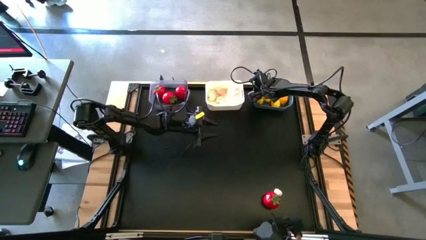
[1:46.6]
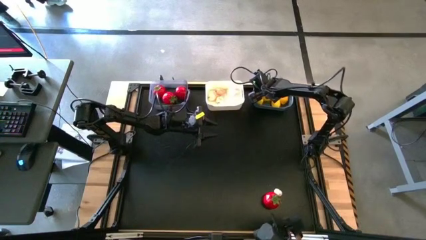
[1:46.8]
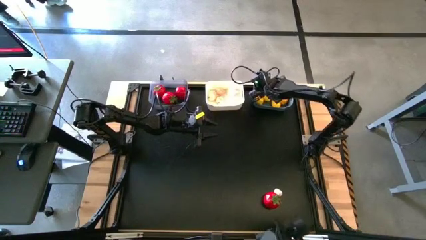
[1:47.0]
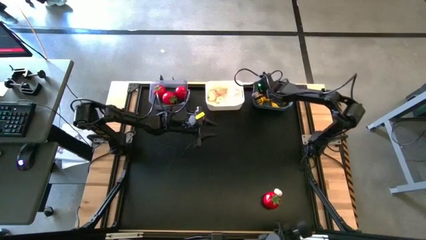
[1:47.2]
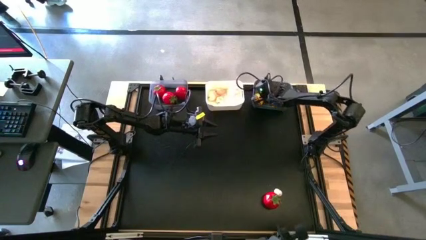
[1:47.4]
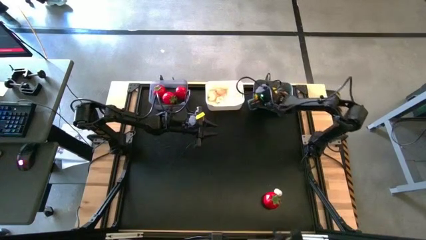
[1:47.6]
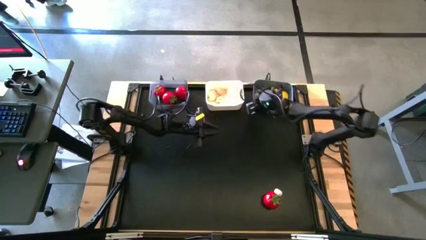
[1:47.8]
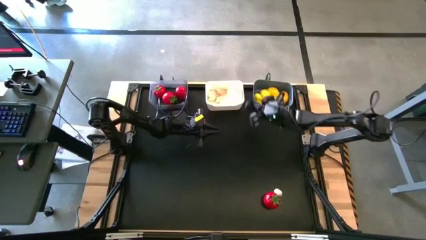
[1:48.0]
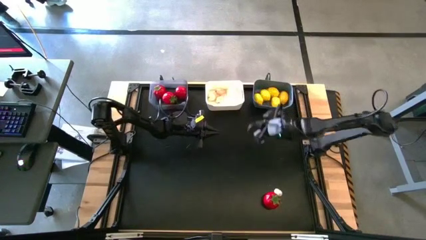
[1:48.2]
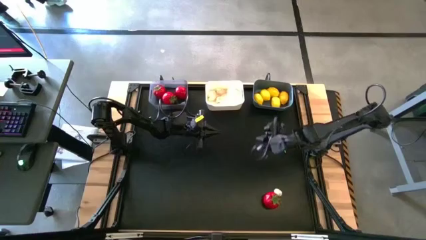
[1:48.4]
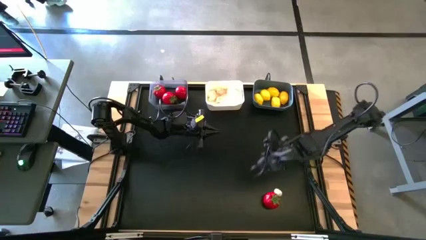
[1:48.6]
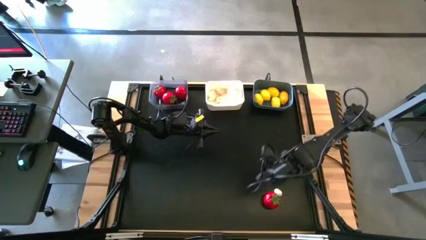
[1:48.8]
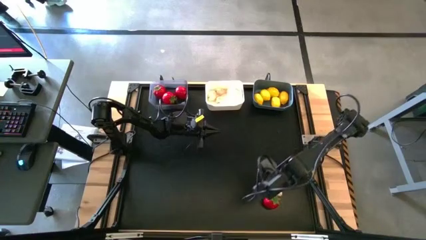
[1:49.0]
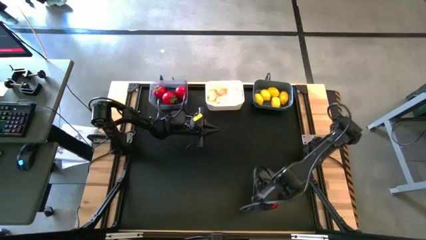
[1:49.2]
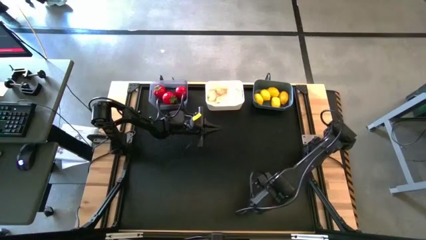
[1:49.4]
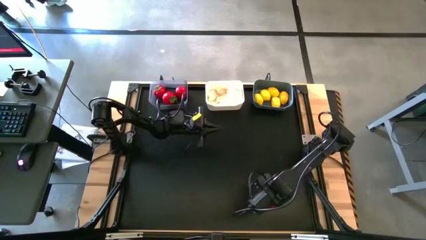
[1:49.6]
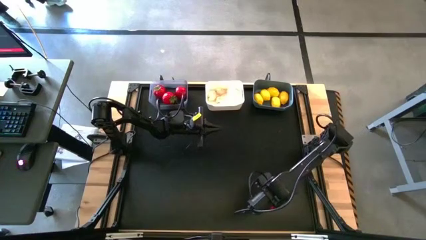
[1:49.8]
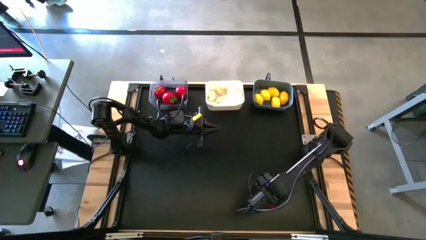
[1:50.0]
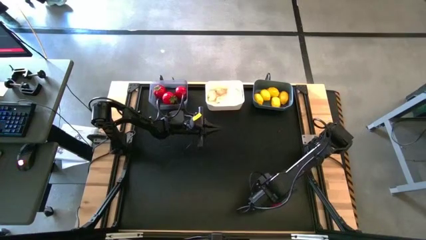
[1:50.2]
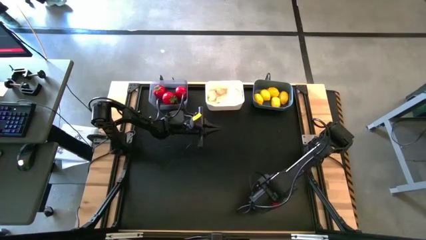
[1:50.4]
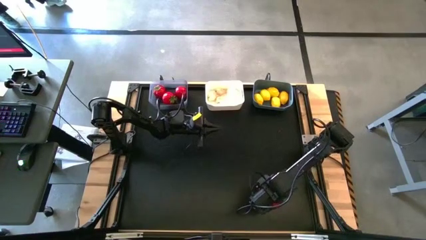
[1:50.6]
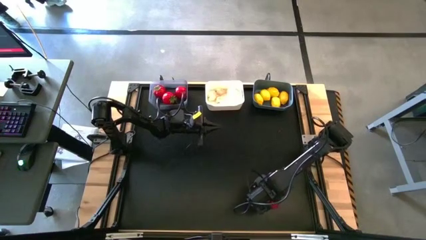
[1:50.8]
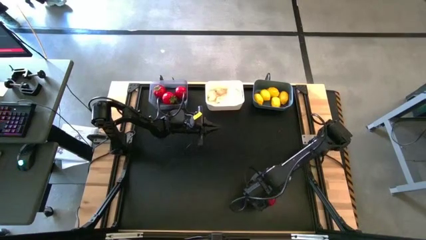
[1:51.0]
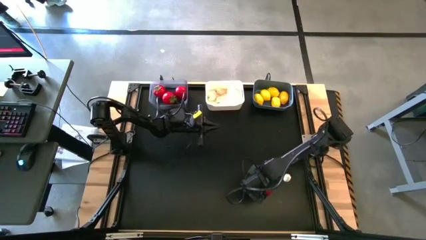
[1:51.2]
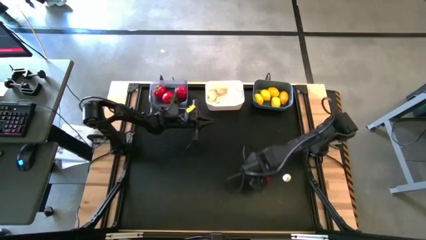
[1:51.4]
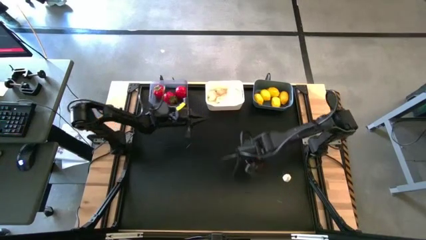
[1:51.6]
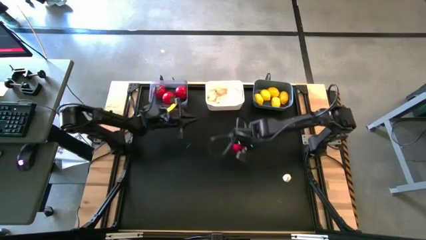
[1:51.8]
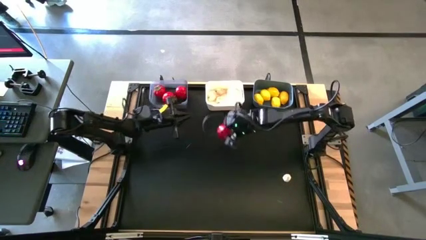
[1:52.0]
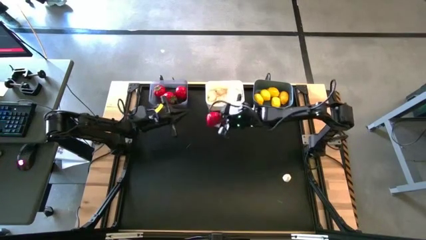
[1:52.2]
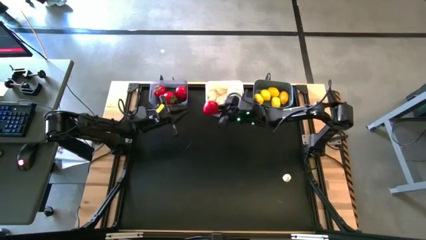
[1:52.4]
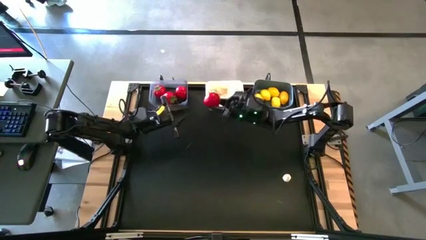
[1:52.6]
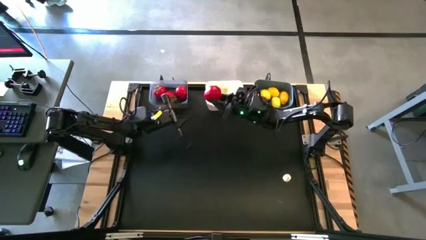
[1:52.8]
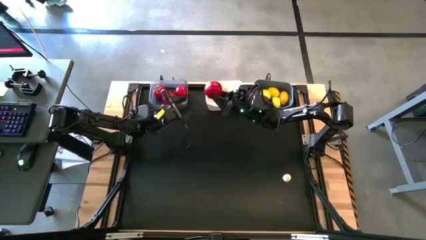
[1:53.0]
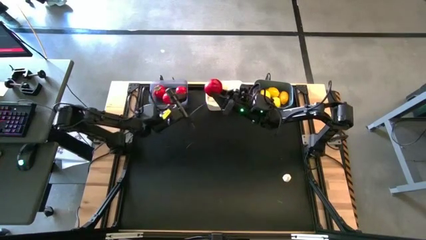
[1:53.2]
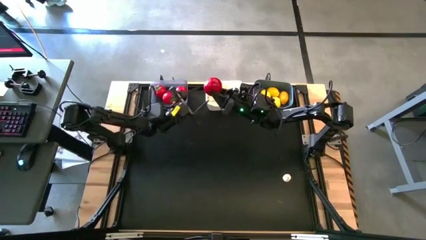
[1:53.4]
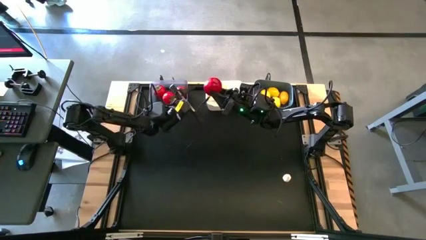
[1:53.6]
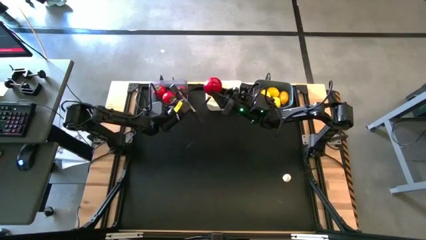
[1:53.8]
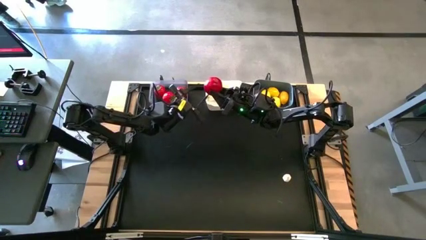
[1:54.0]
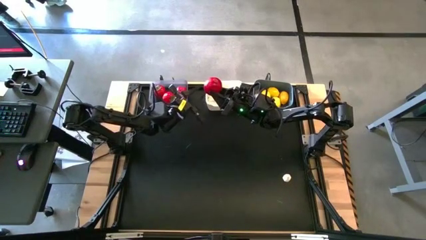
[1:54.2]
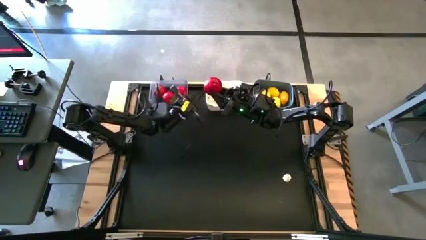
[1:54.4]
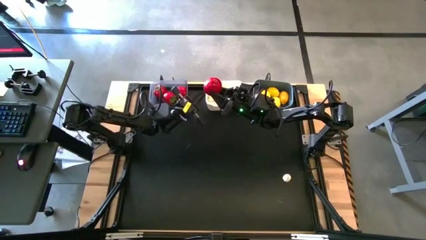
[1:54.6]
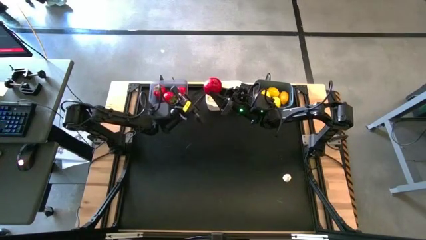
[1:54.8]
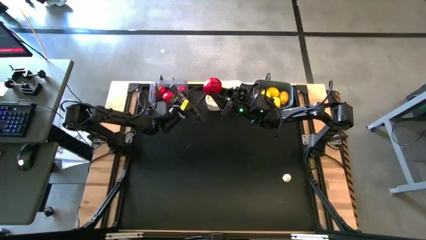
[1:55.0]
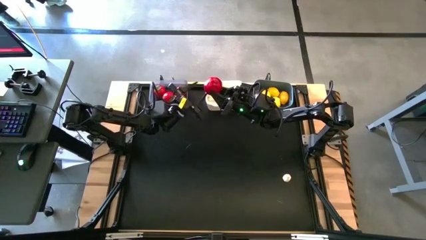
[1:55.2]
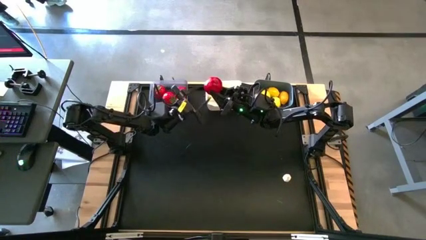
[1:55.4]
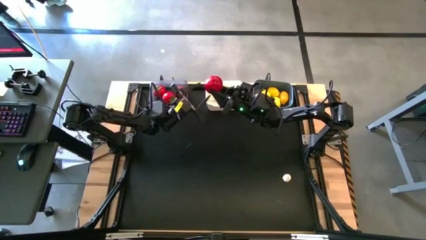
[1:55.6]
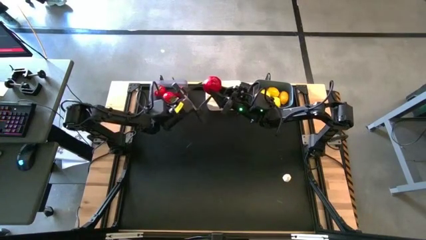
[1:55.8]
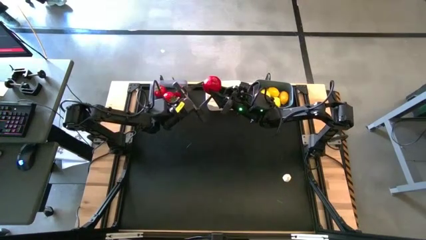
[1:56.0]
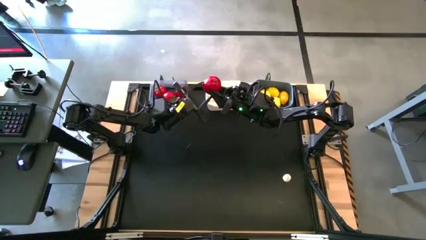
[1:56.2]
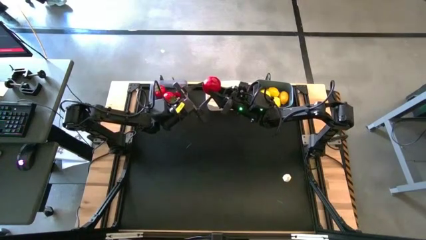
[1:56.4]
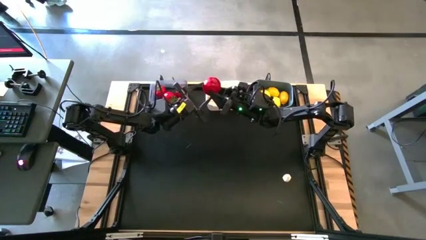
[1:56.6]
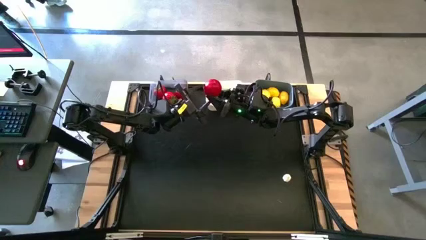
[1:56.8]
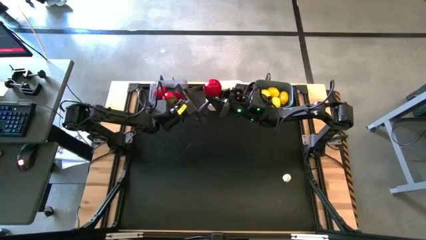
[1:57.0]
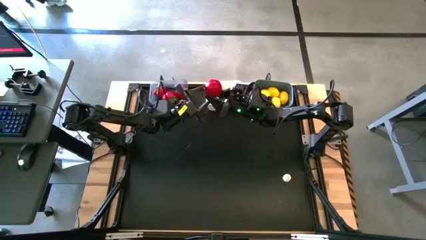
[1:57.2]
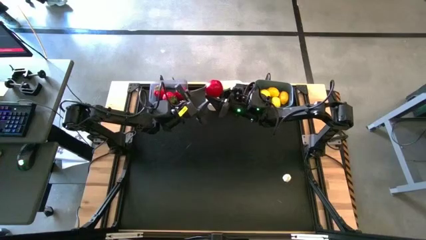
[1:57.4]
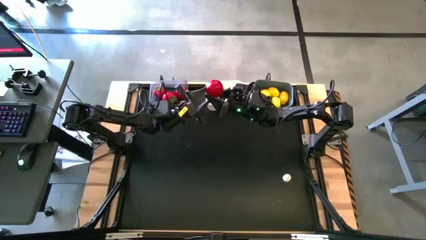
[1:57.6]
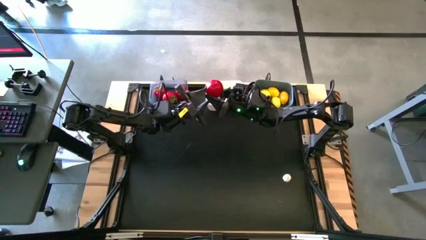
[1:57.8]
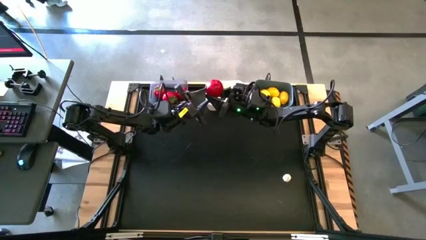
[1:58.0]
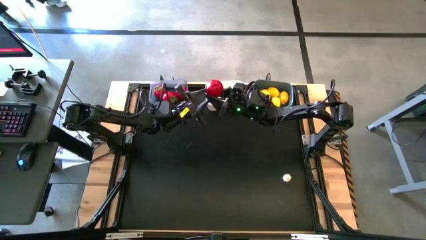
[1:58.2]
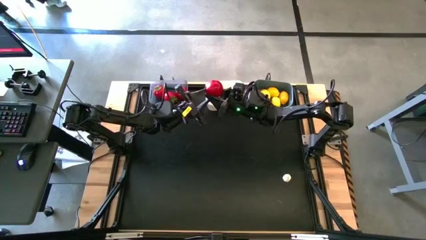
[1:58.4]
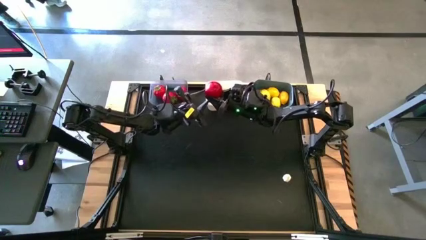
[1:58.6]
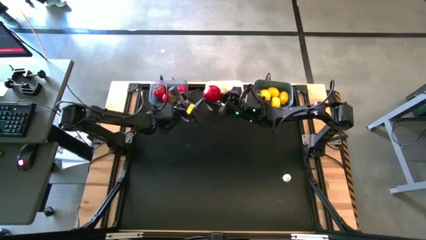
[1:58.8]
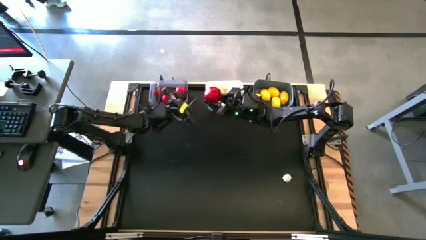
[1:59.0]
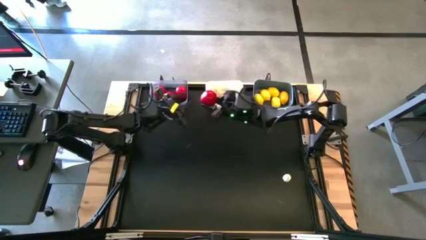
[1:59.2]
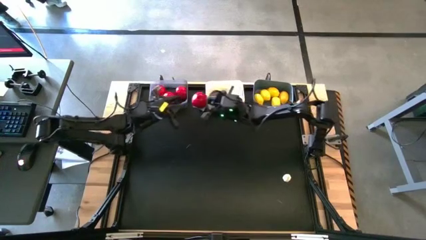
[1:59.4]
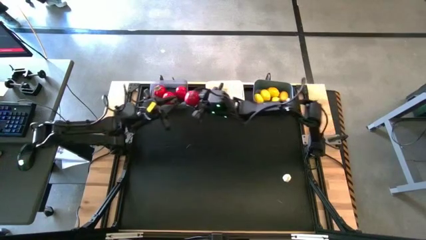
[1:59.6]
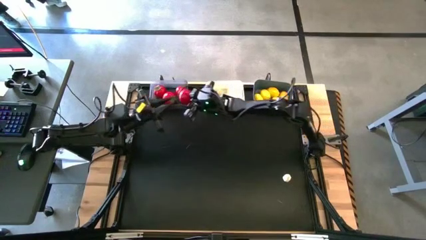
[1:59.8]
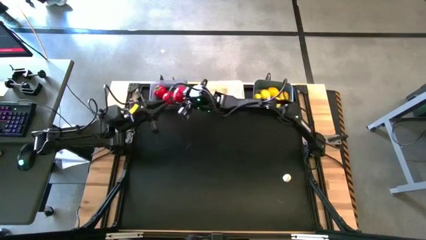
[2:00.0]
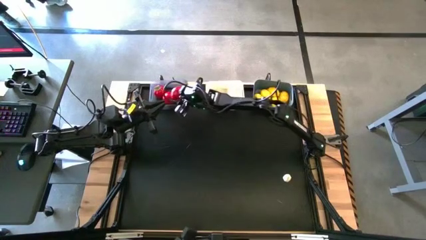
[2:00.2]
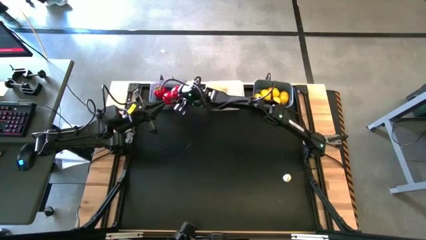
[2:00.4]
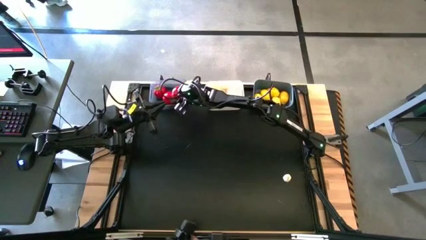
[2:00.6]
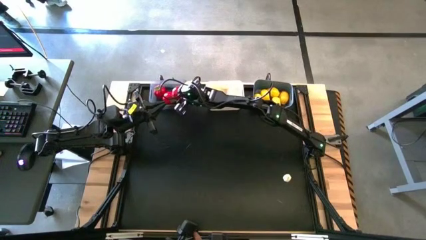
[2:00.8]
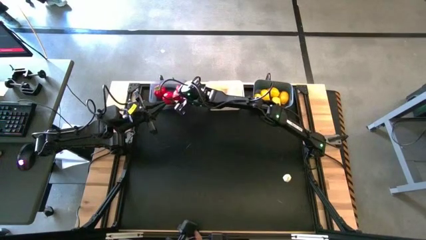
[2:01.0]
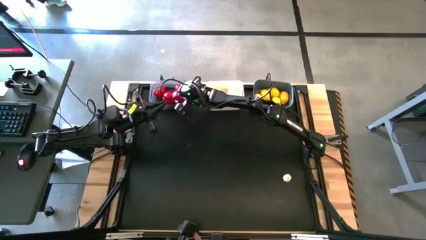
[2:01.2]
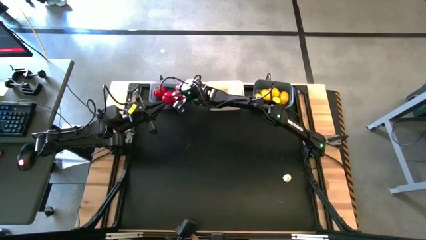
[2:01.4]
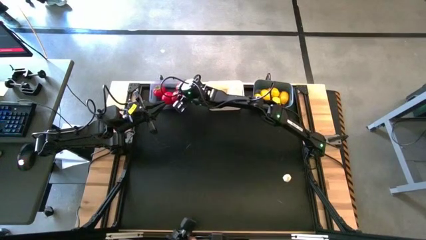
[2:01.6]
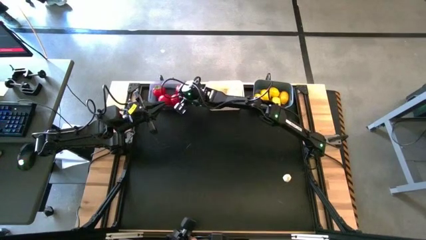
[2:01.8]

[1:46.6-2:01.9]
Task: Sort produce into baskets
Put the tomato into the black bin
